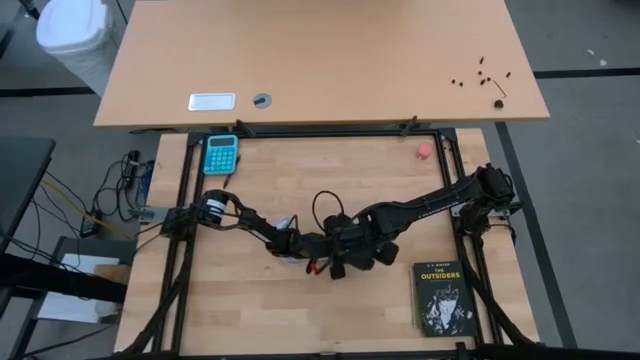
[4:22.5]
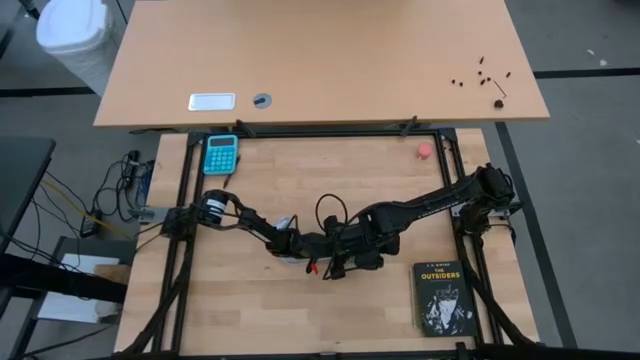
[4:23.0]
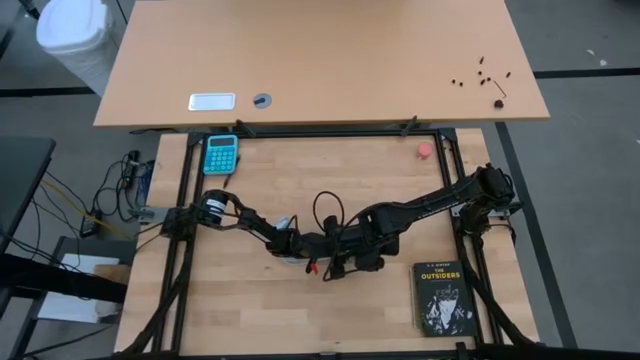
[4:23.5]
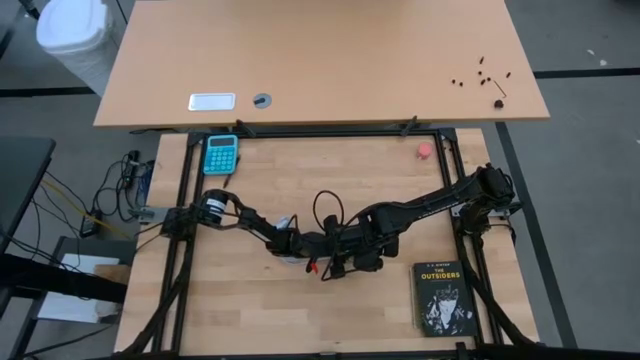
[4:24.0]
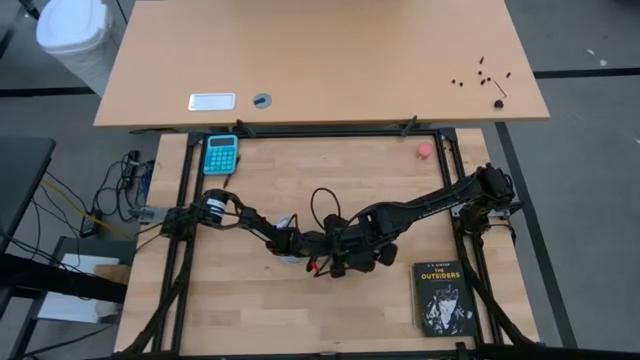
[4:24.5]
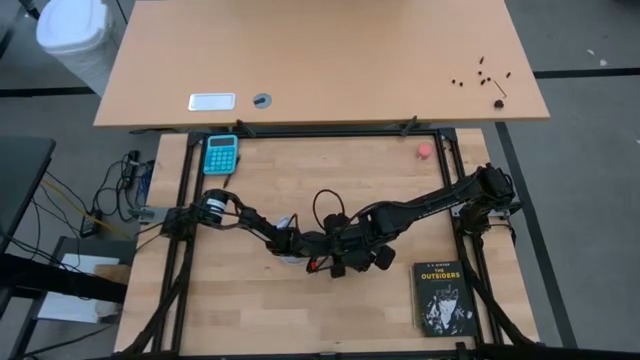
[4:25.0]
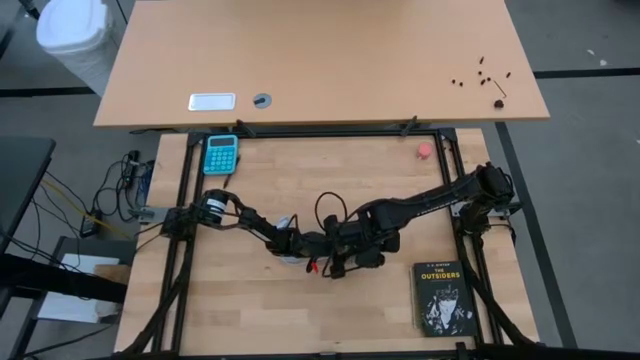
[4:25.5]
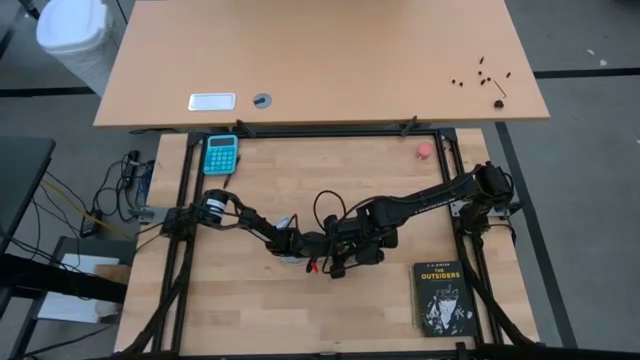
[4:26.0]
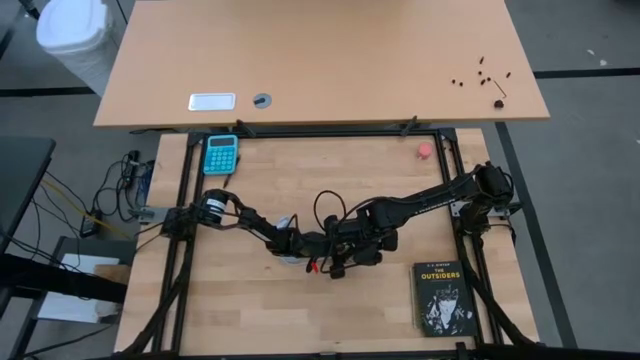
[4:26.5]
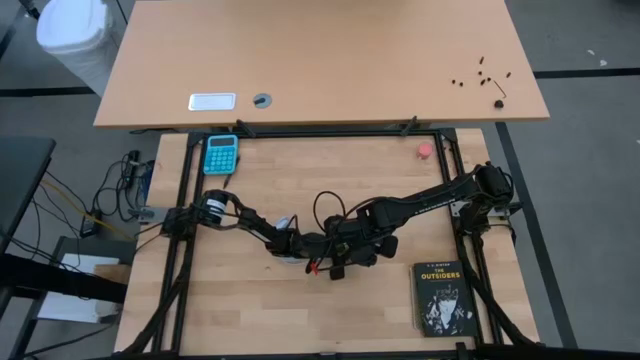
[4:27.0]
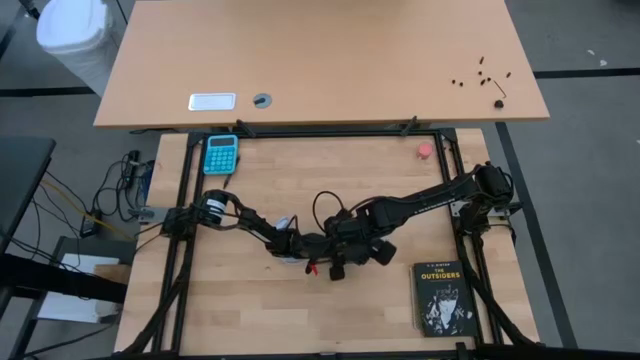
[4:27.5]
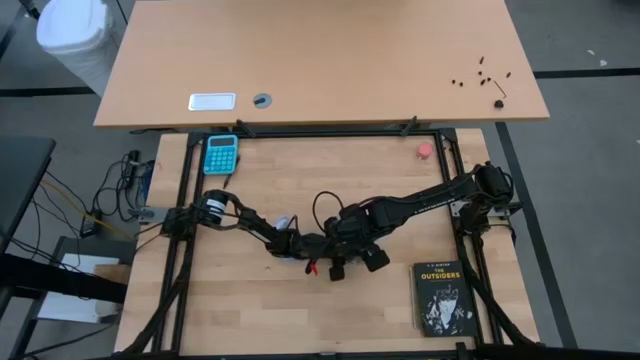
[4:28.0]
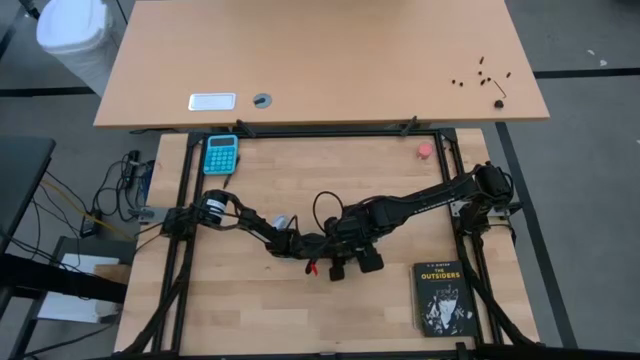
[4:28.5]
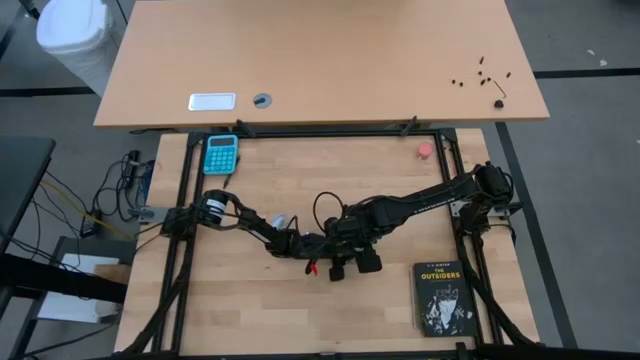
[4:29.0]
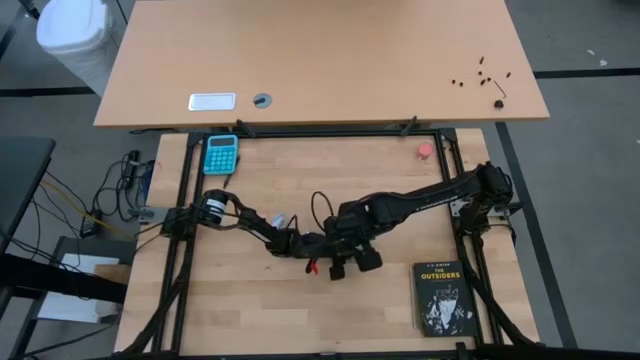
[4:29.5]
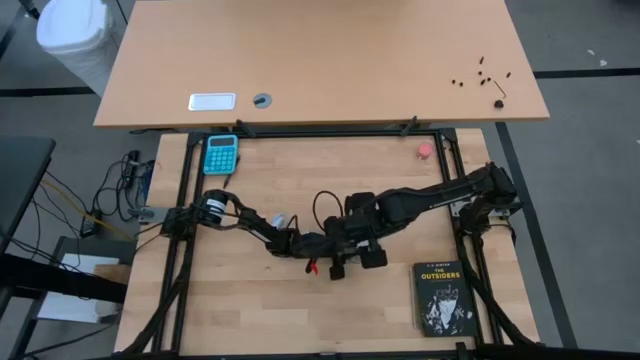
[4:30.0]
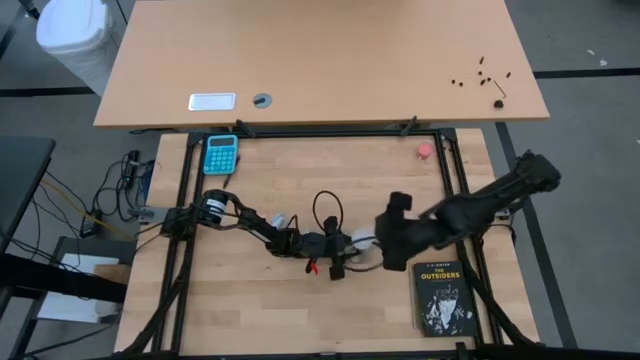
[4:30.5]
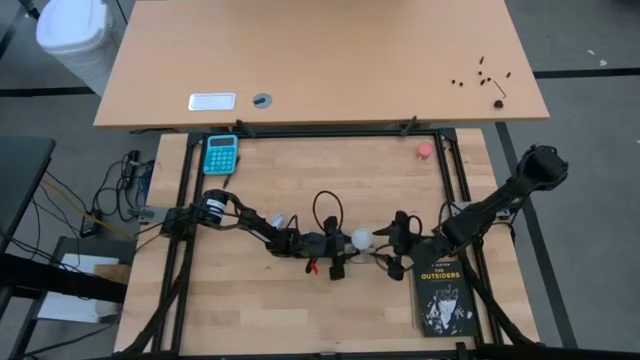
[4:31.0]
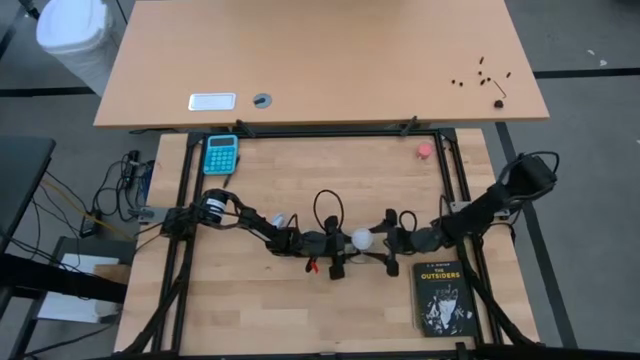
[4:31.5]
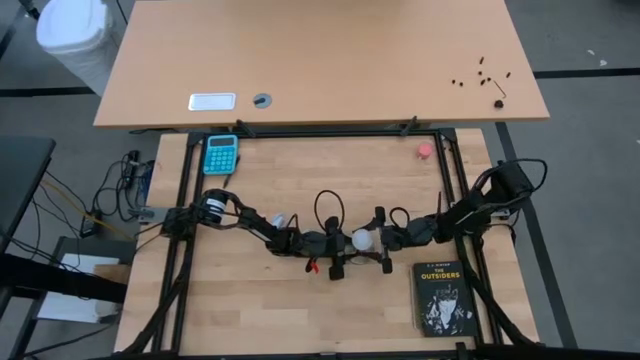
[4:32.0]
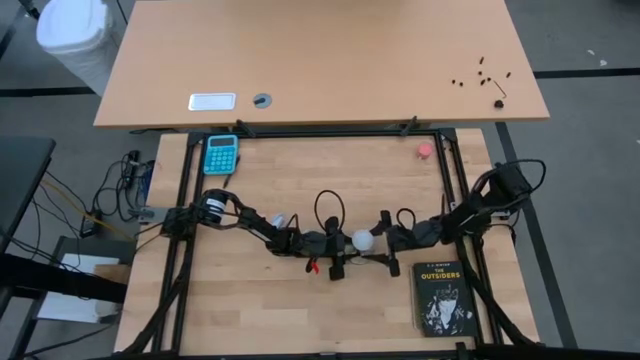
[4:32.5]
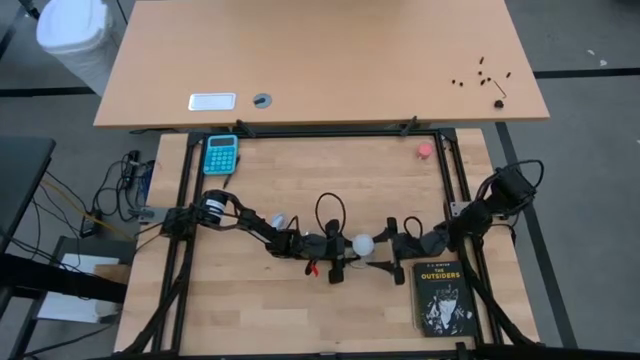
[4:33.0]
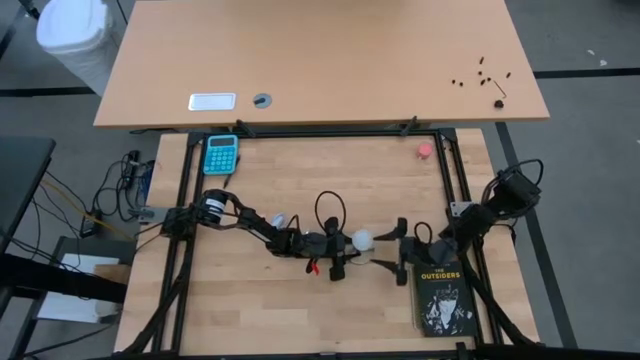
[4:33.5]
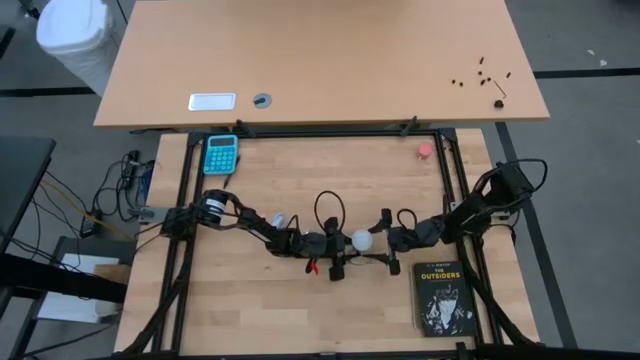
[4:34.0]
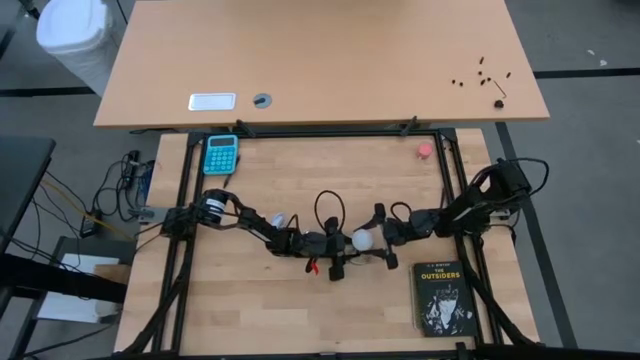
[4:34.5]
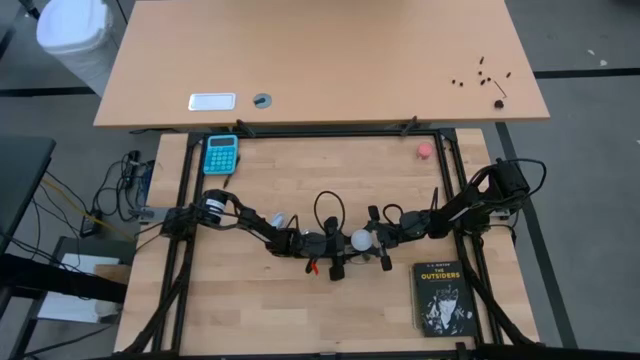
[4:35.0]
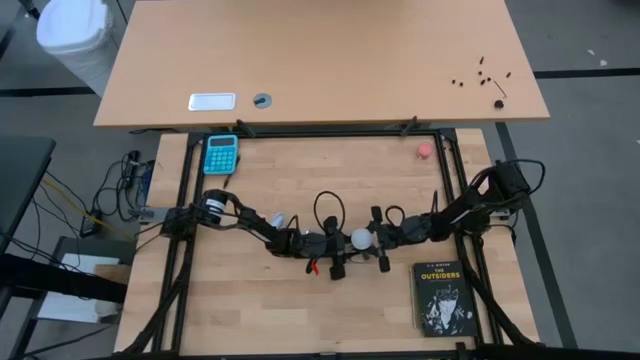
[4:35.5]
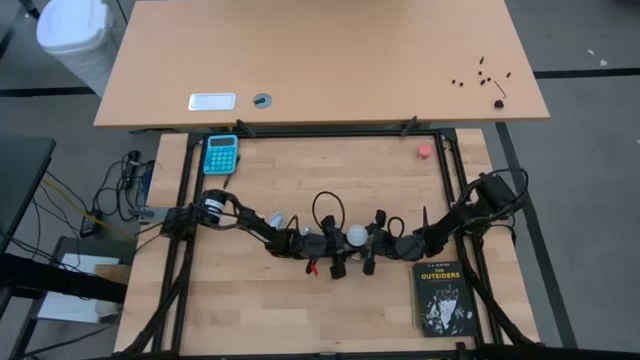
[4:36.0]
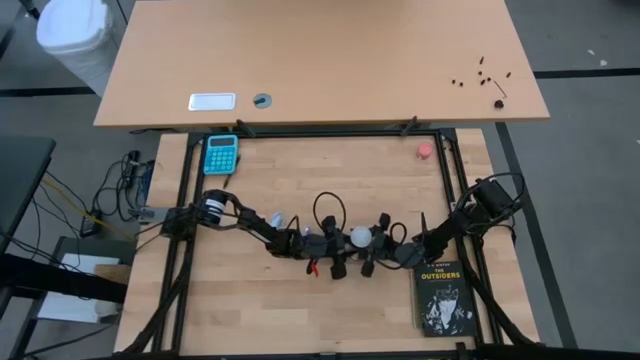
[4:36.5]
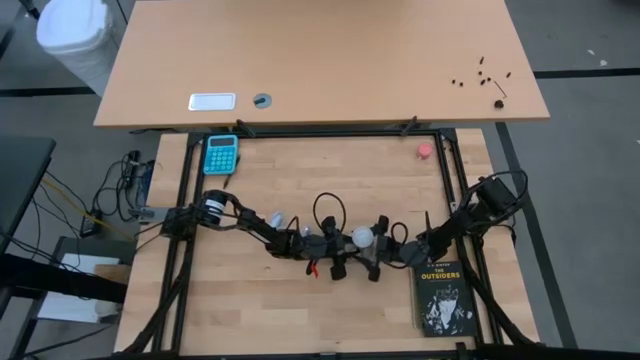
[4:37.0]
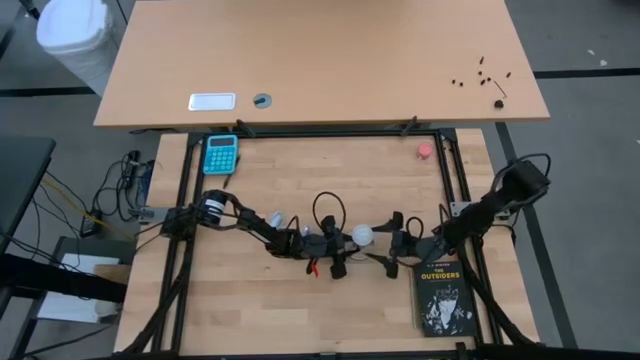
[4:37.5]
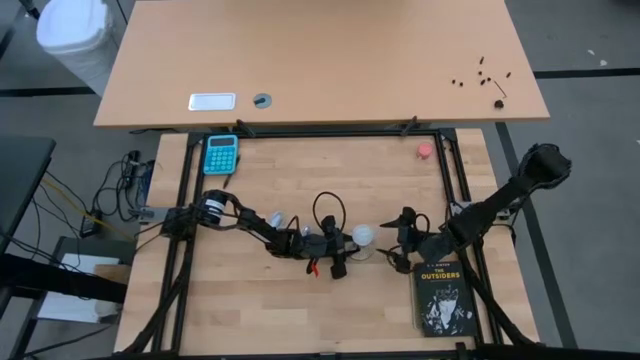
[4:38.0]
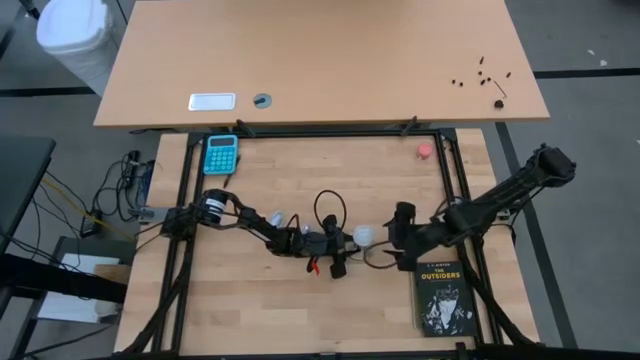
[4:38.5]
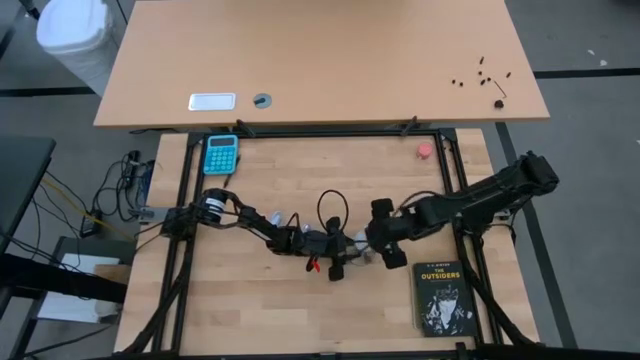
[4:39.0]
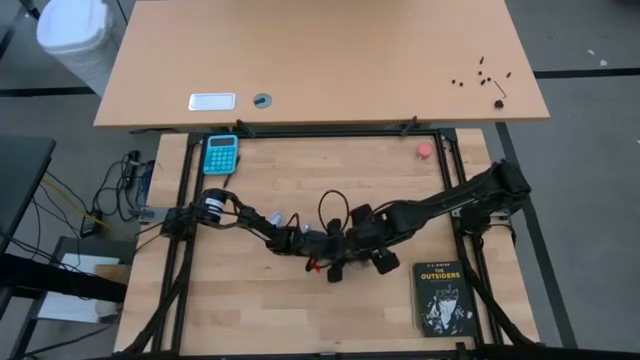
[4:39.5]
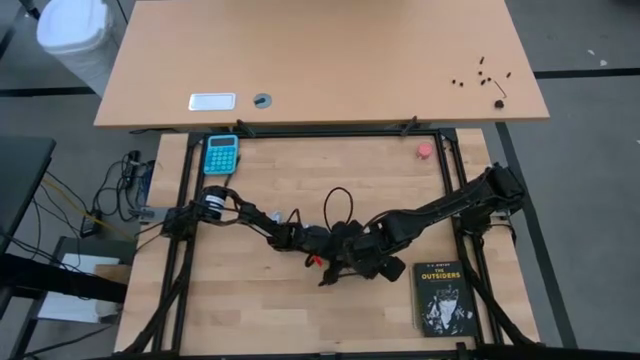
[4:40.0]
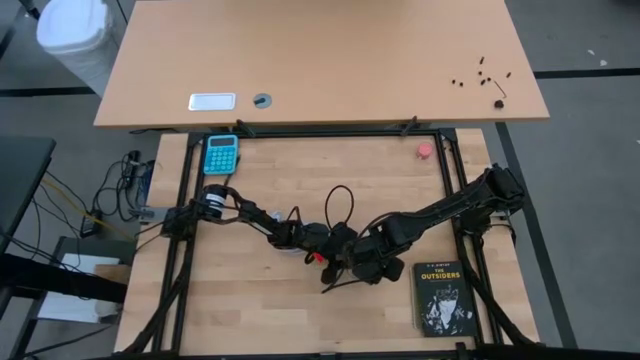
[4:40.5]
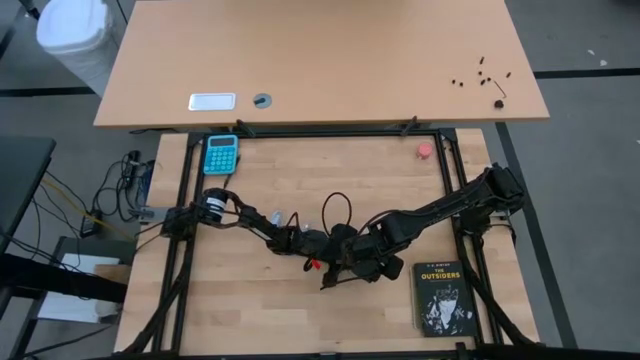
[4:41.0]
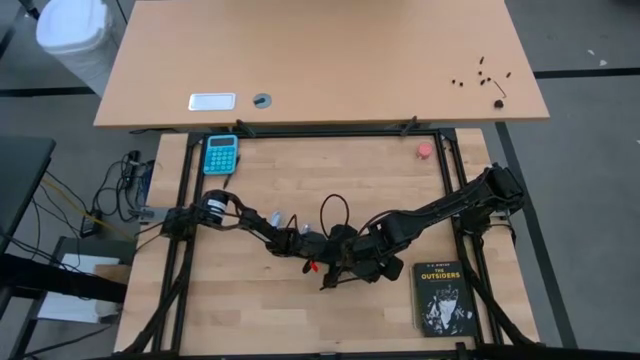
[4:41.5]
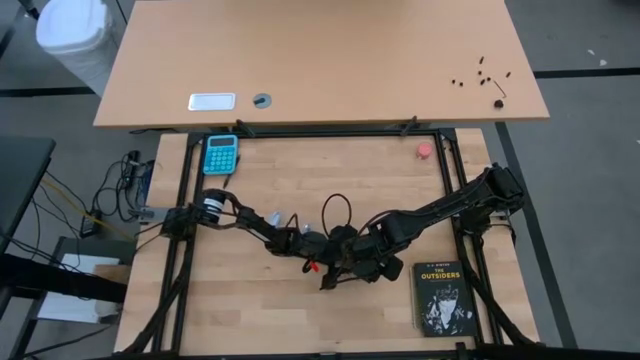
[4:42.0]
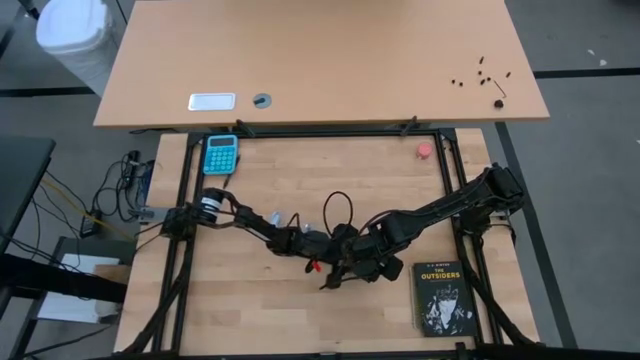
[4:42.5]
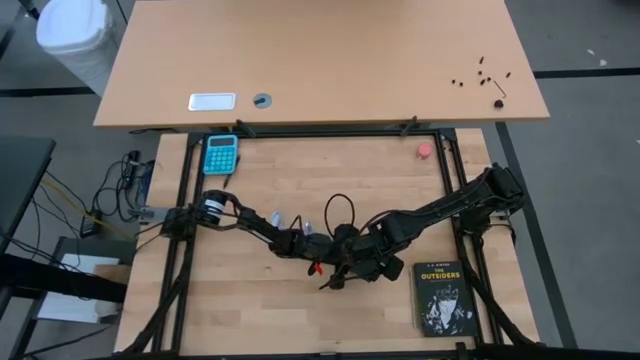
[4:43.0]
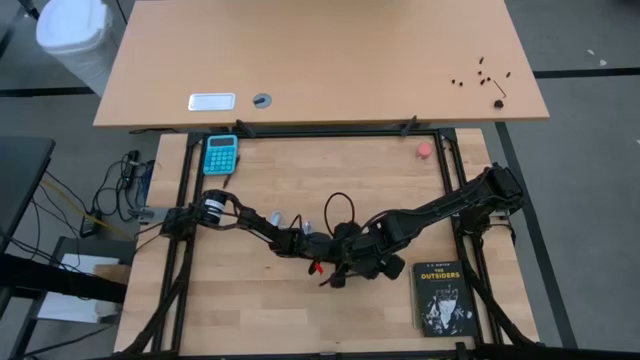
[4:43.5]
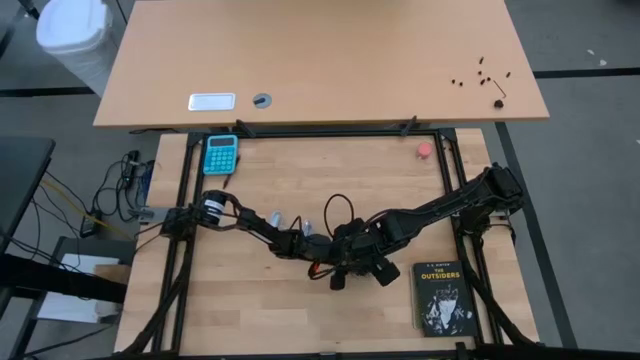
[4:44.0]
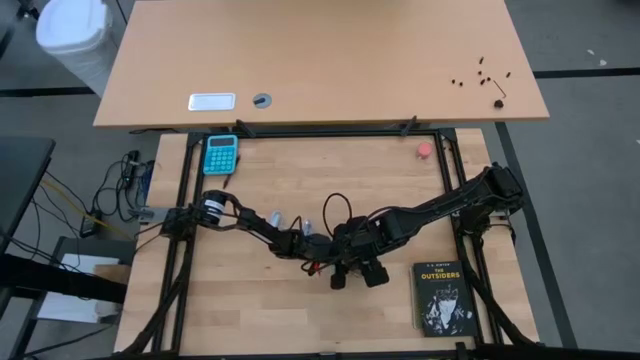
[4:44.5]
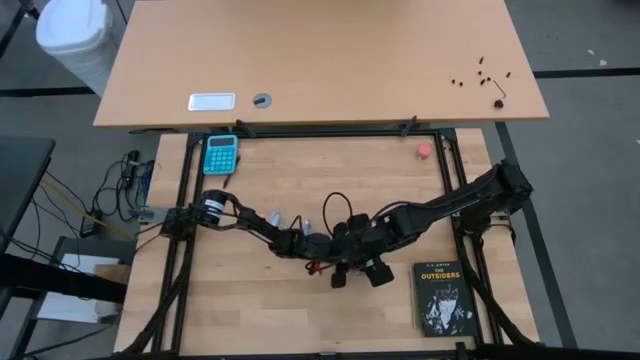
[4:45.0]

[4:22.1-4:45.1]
Task: Screw lightbulb
Insert the lightbulb into the lamp
